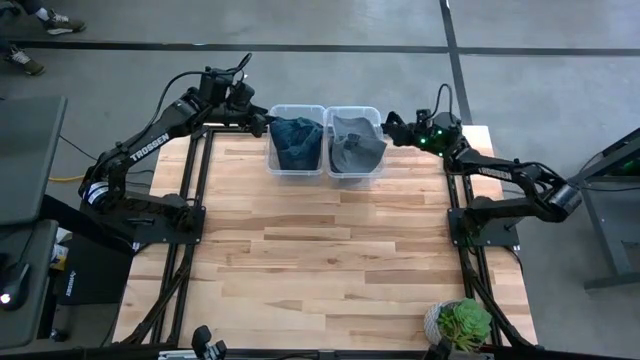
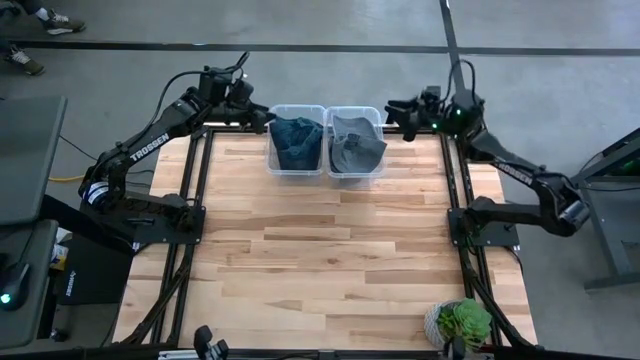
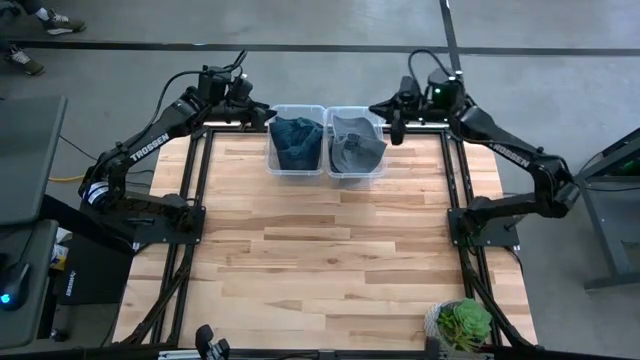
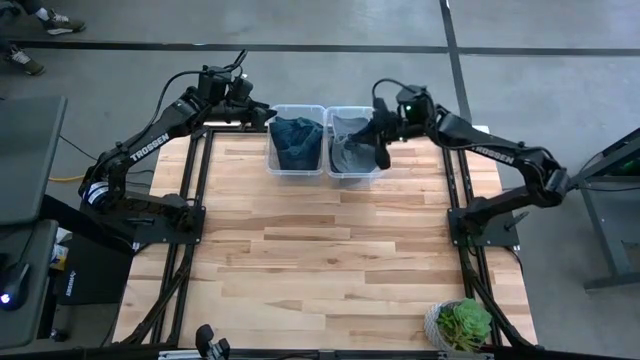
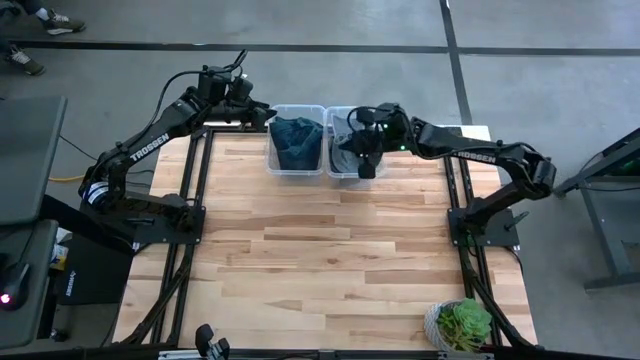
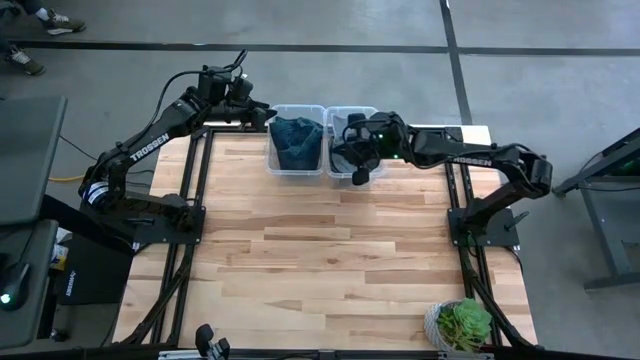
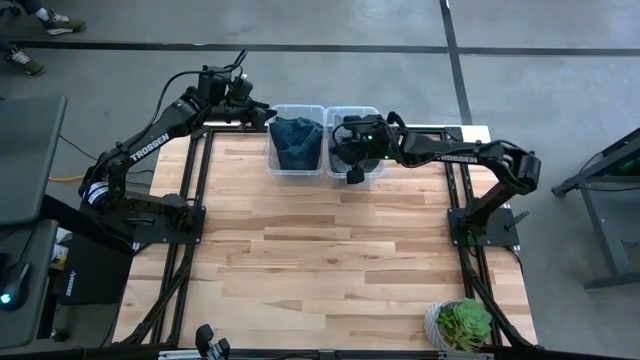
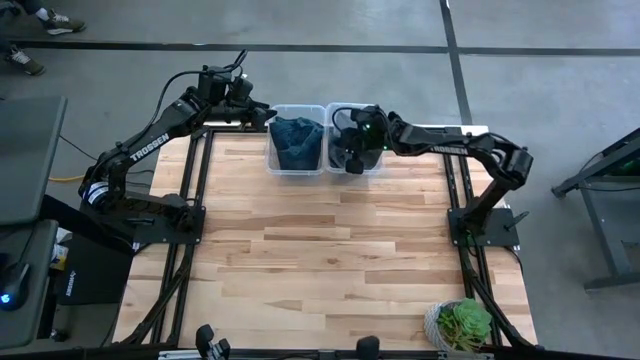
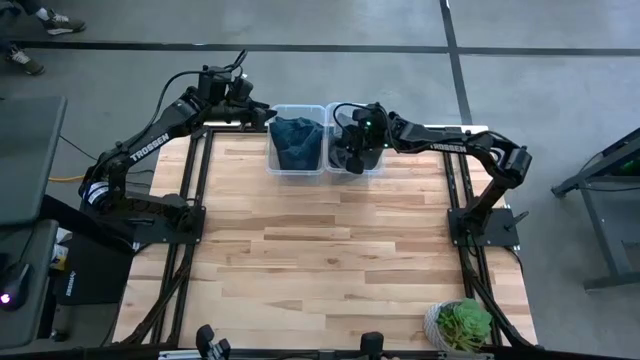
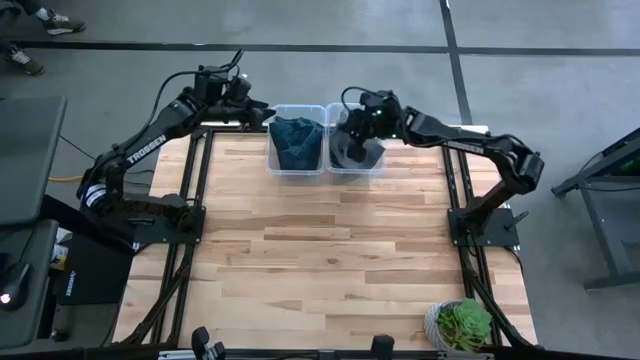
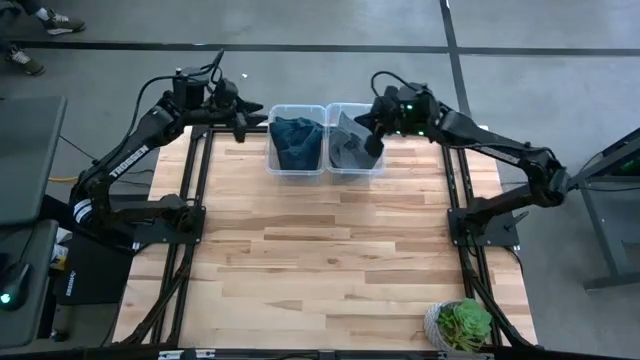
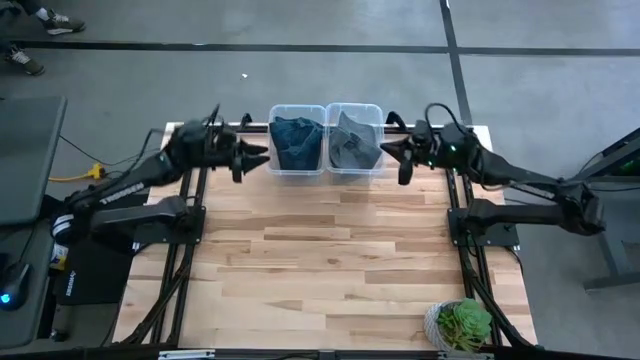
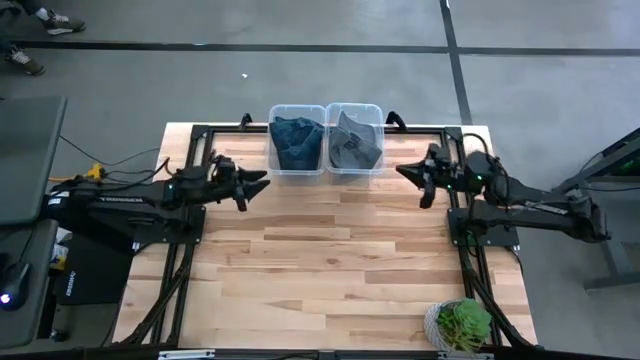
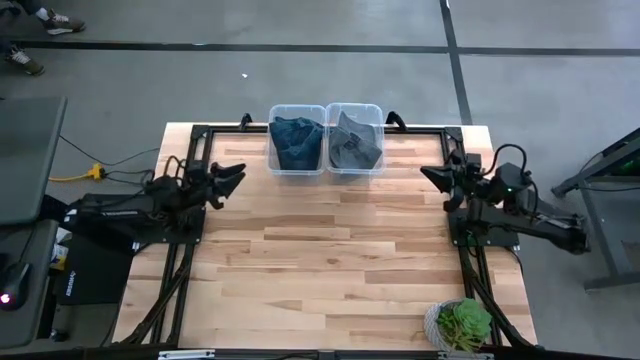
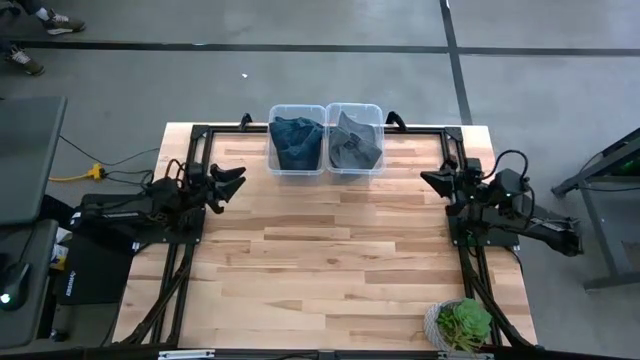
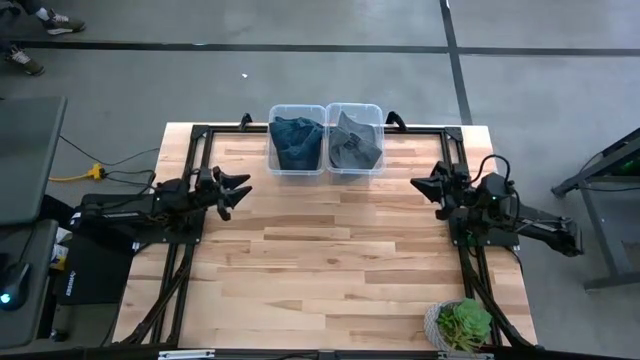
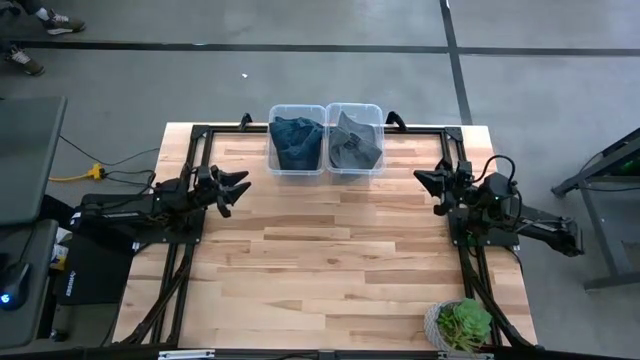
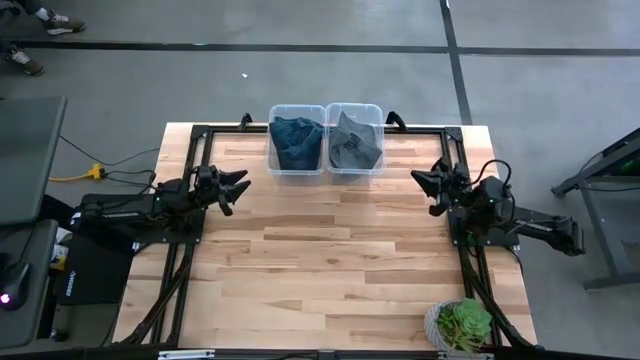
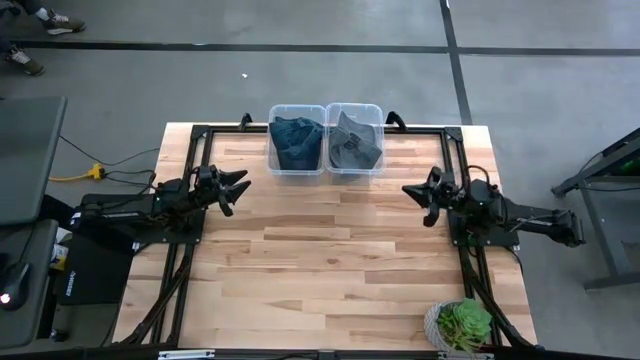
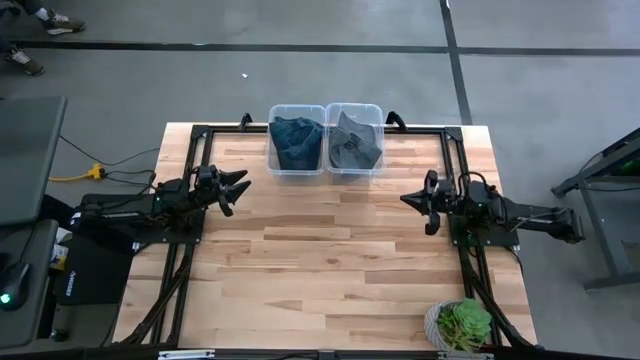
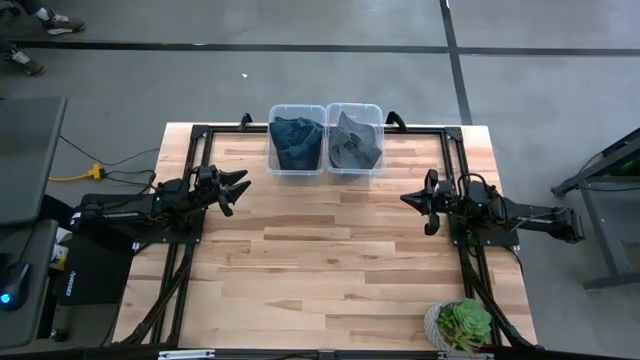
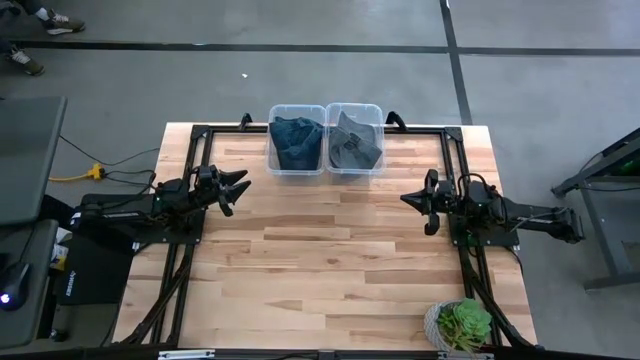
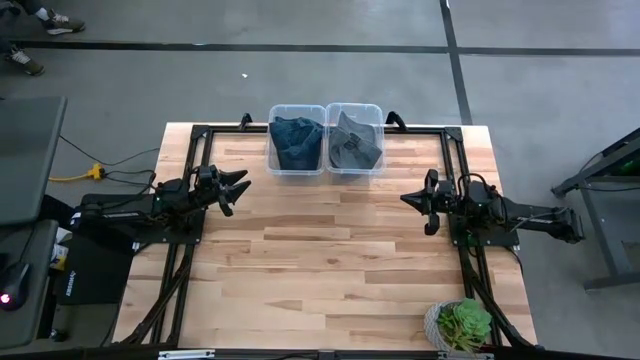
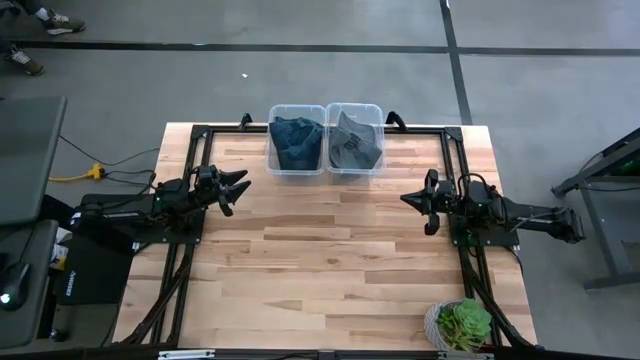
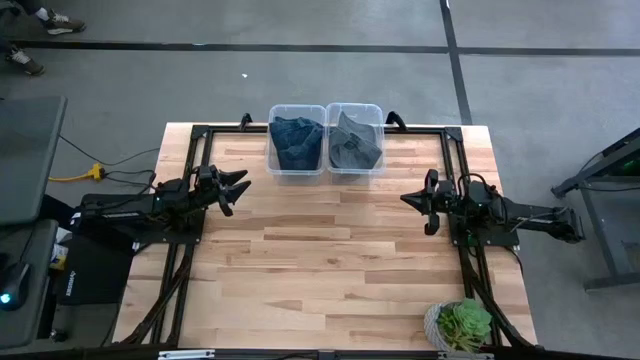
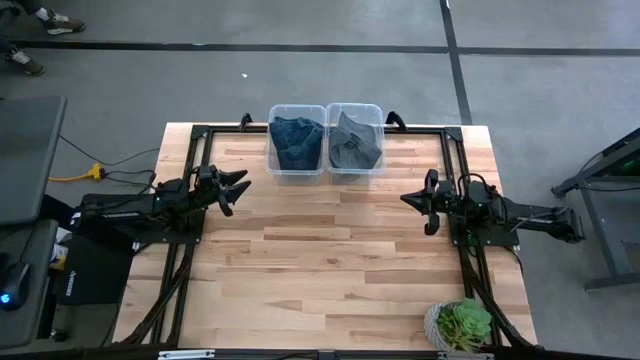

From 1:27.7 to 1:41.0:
Task: Pick & Place hat
Return to Home Position

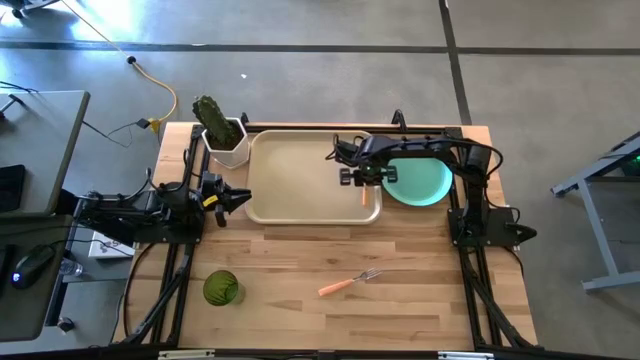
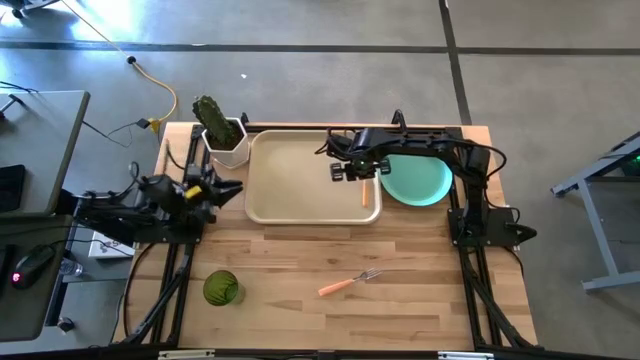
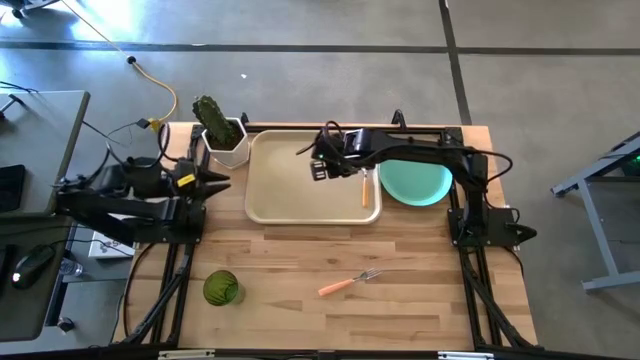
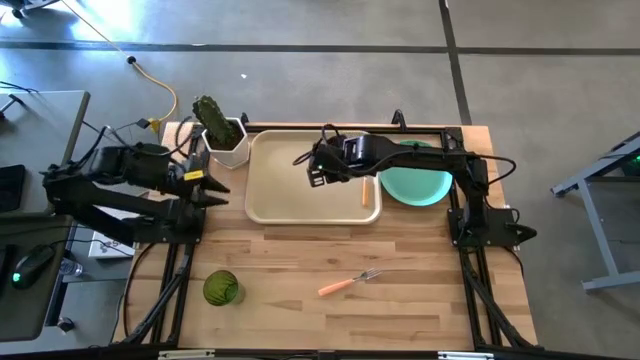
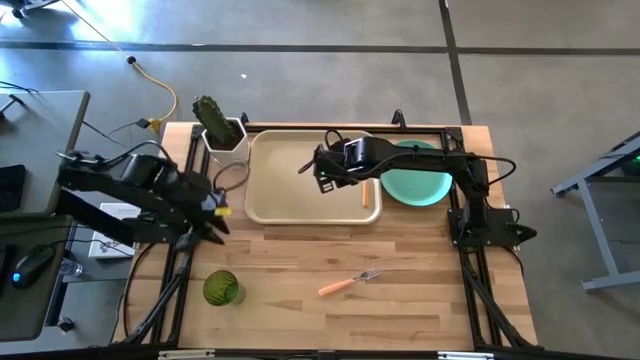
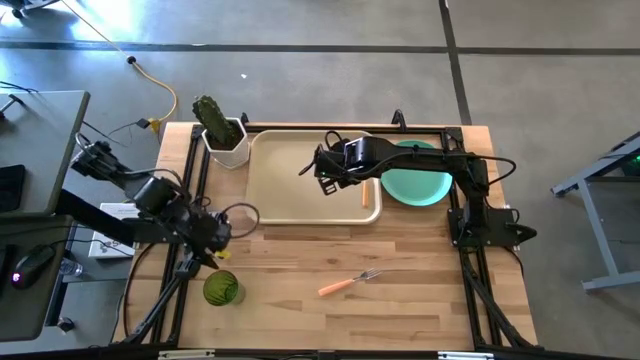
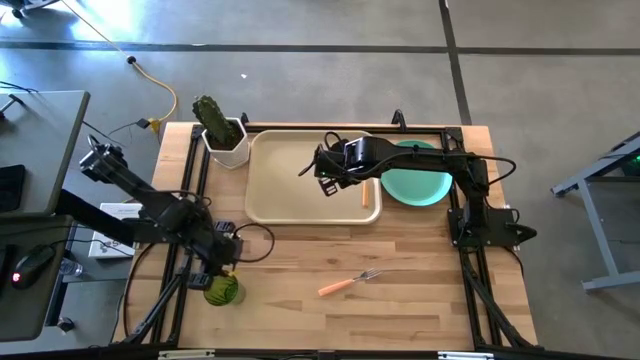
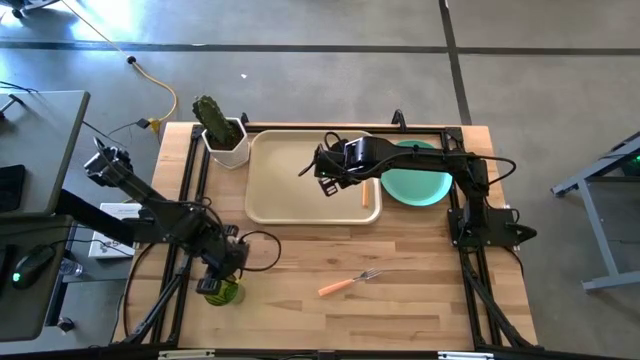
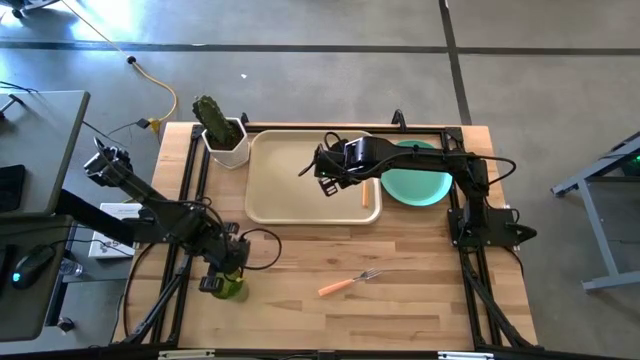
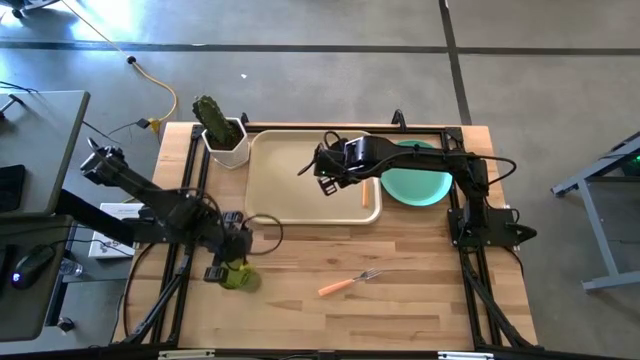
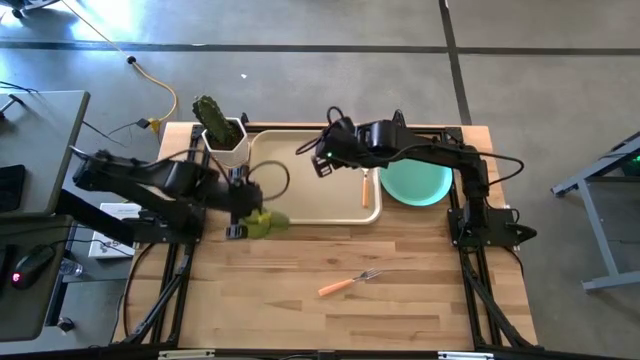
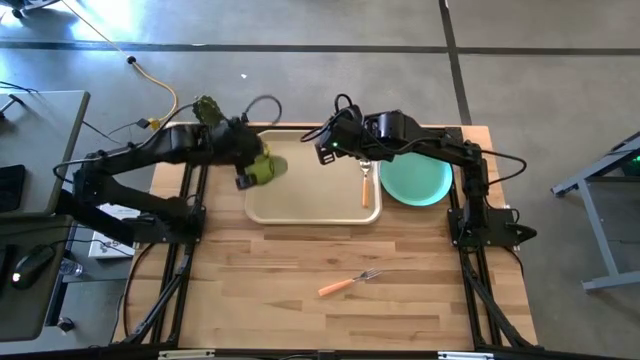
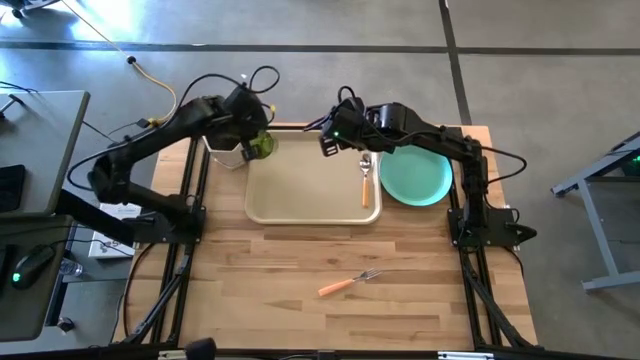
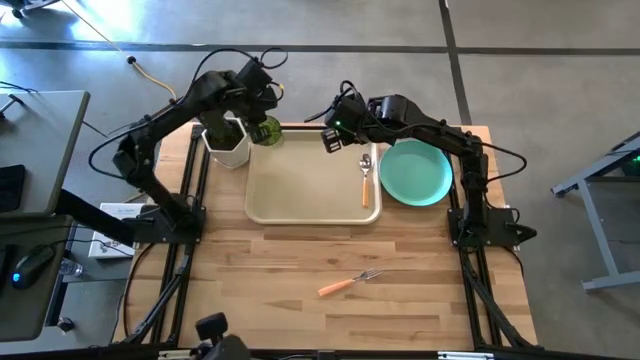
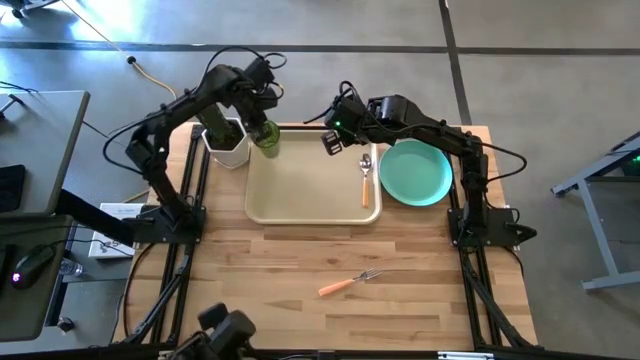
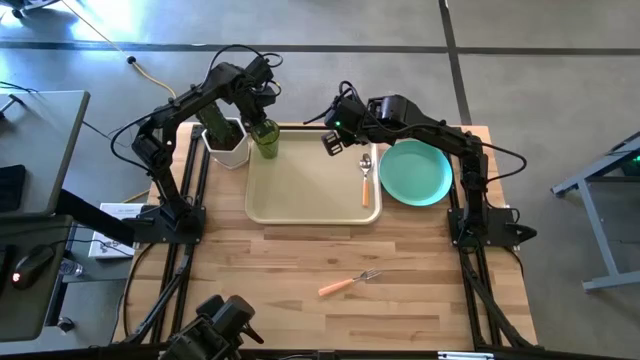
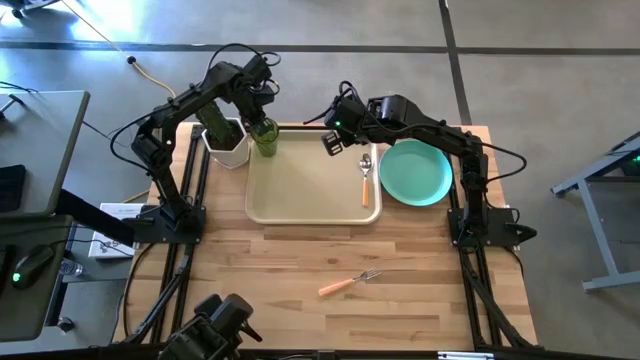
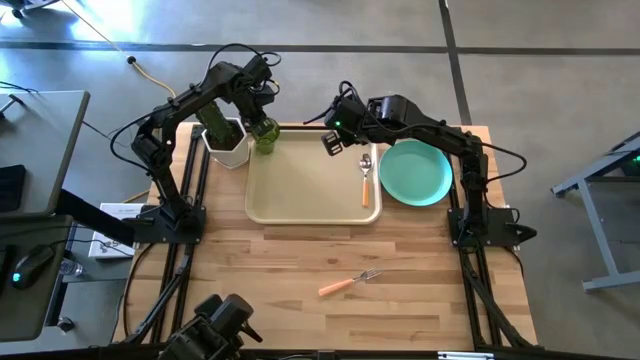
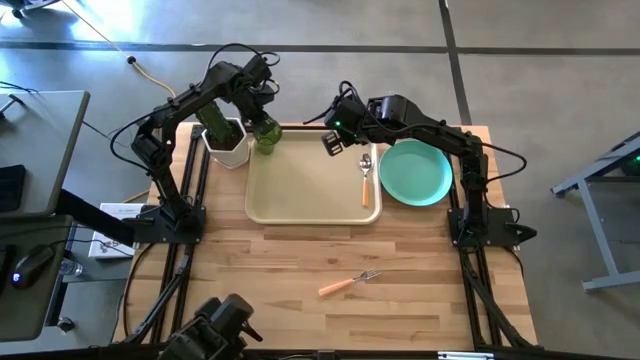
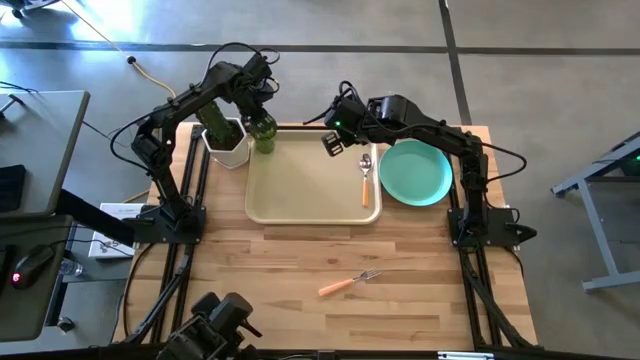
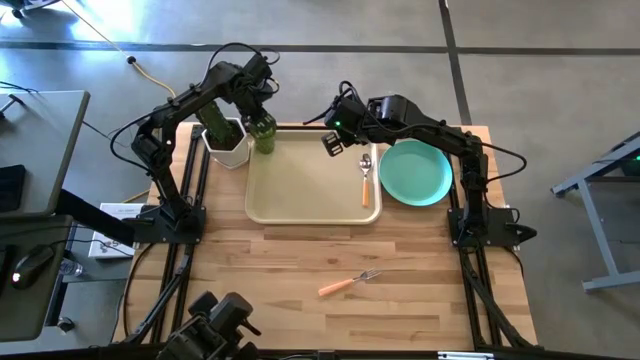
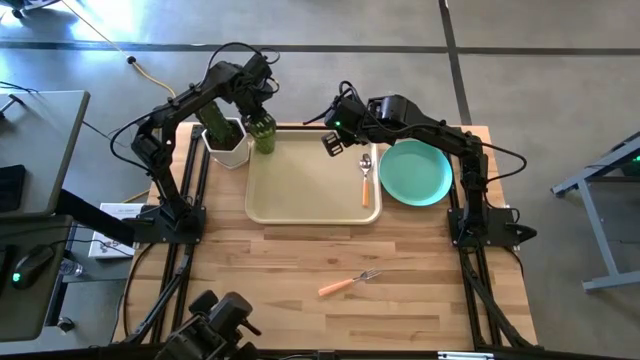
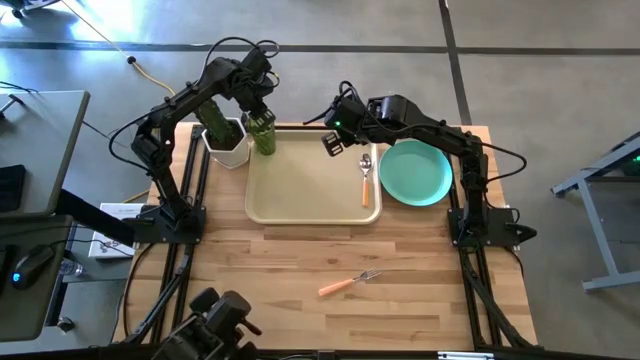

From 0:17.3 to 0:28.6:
Task: Pick and place plate/cup/fork/spoon on tray
Put the green cup on the white serving tray
